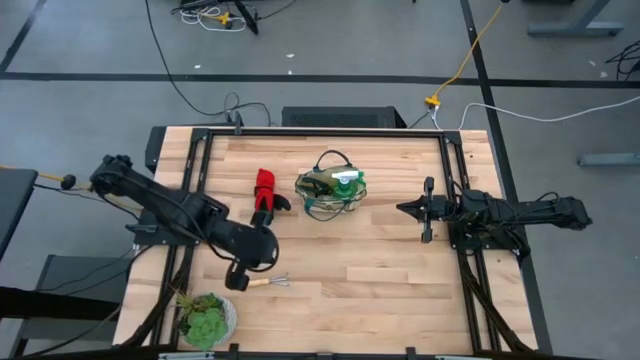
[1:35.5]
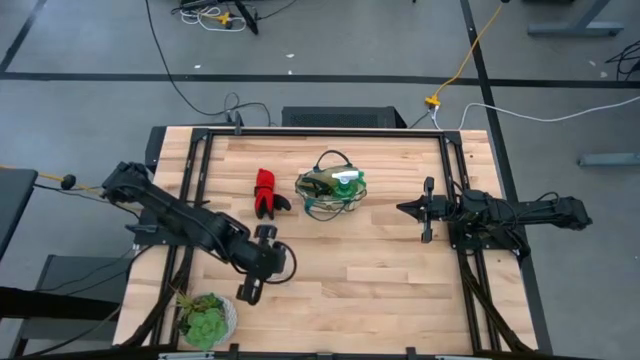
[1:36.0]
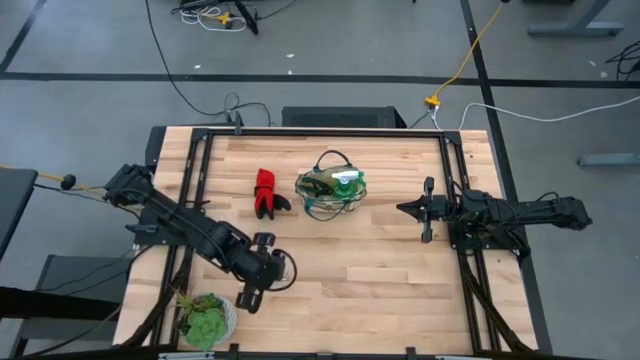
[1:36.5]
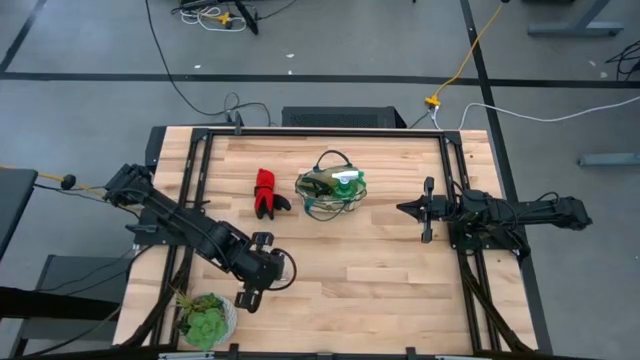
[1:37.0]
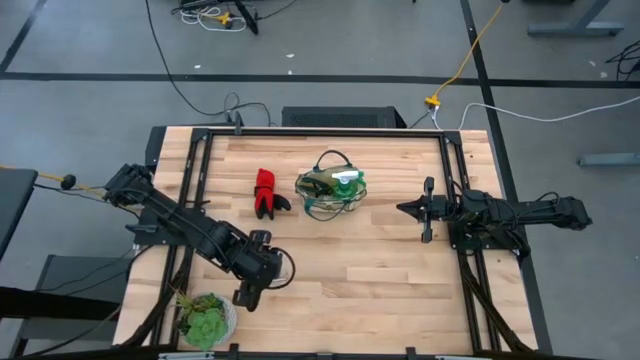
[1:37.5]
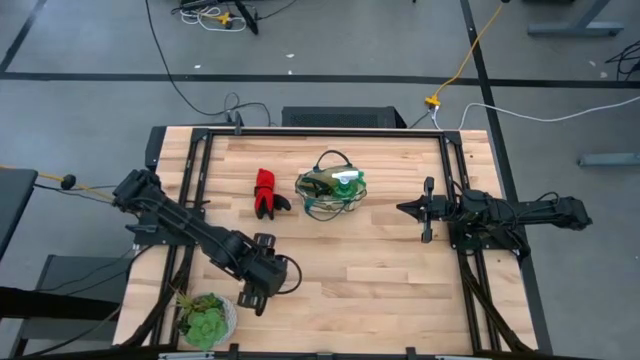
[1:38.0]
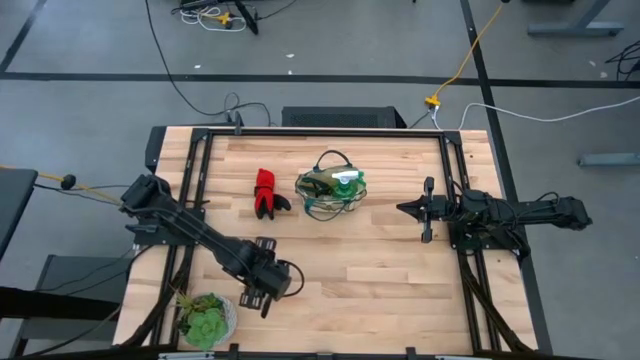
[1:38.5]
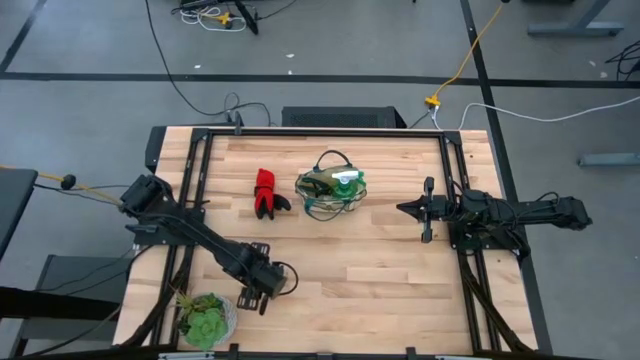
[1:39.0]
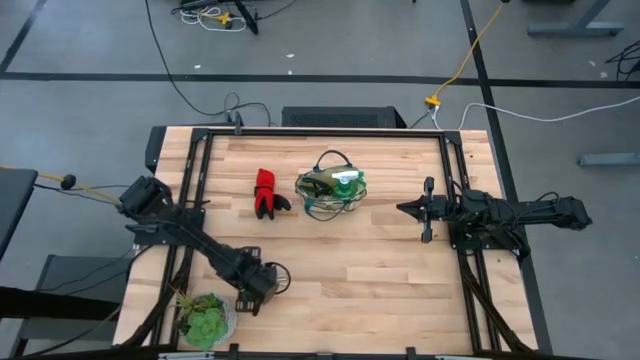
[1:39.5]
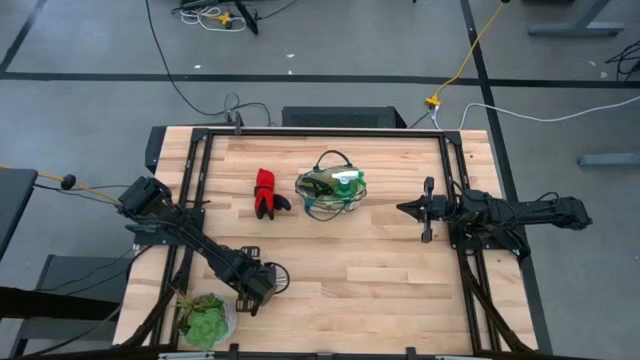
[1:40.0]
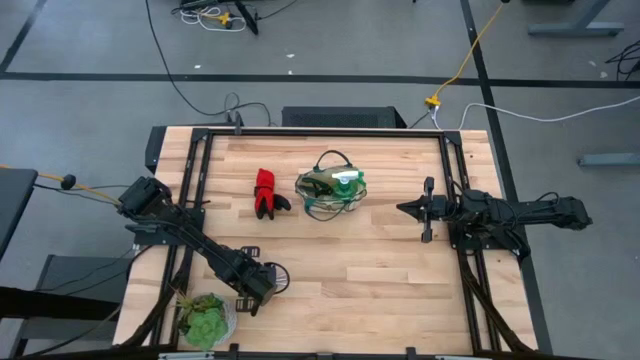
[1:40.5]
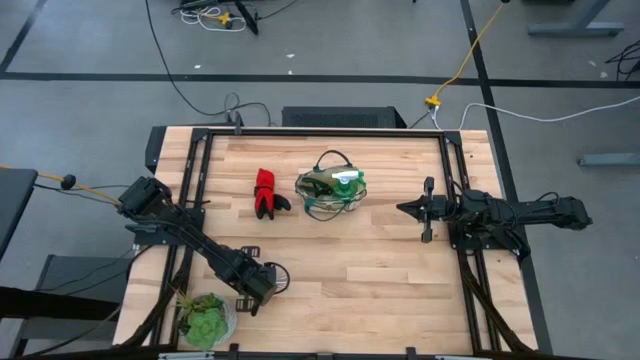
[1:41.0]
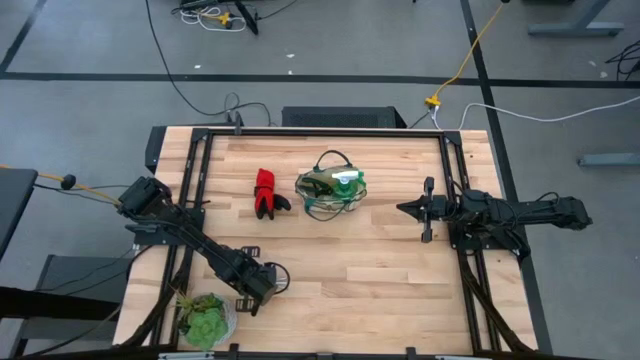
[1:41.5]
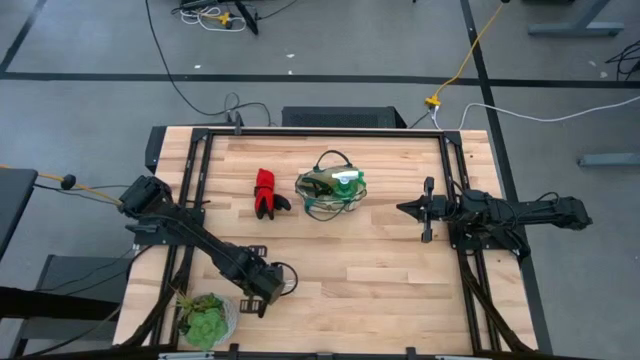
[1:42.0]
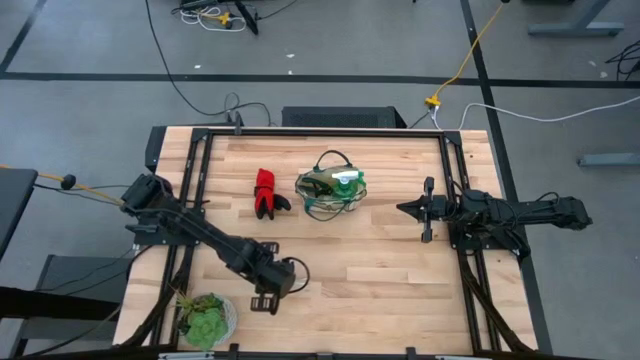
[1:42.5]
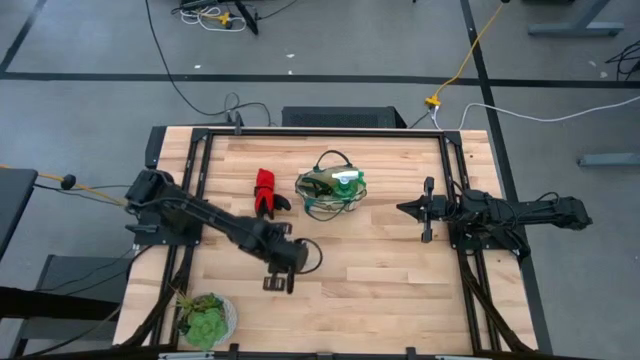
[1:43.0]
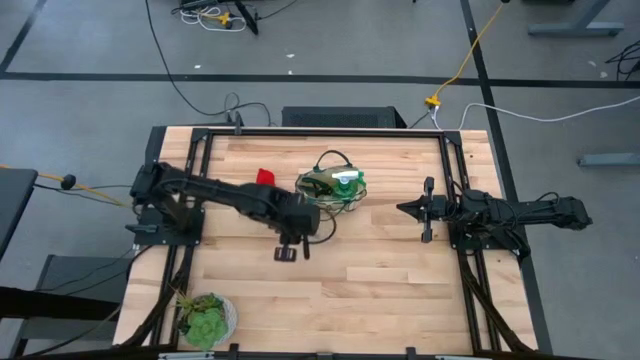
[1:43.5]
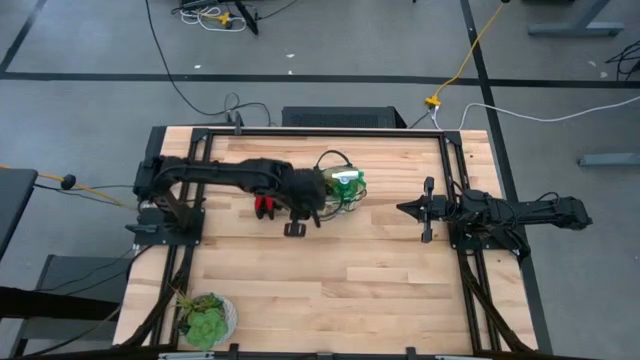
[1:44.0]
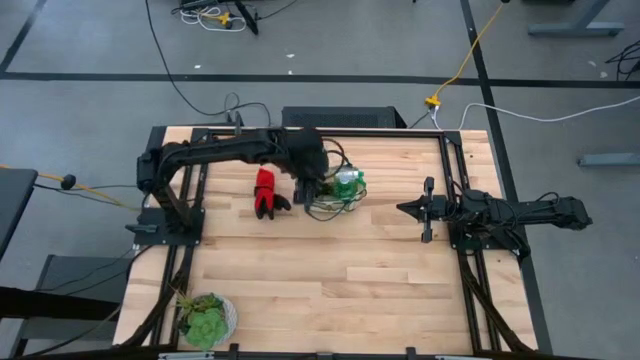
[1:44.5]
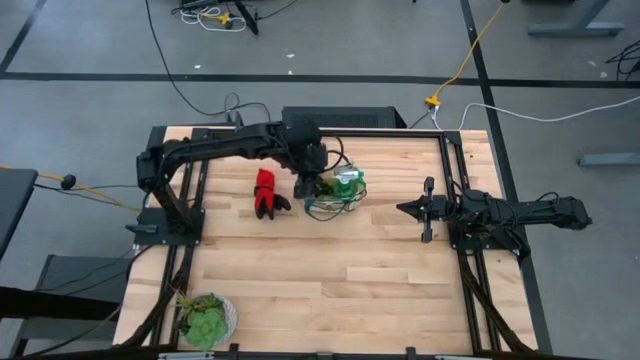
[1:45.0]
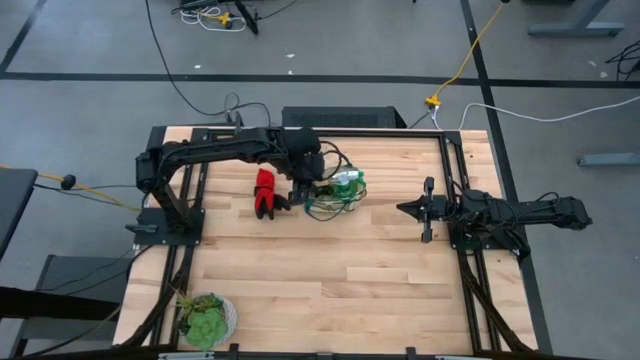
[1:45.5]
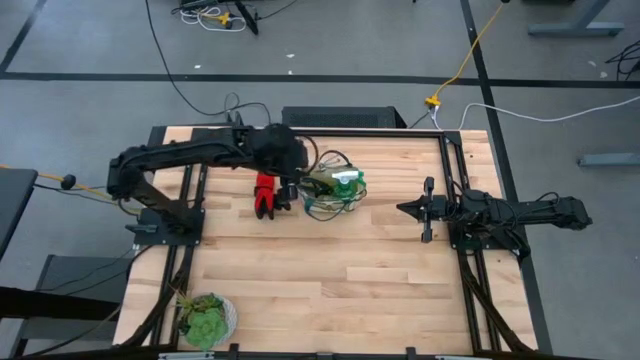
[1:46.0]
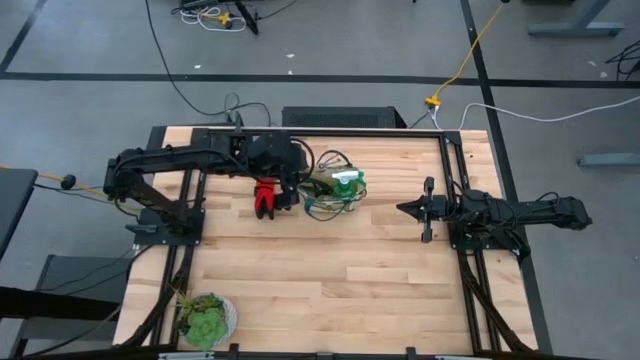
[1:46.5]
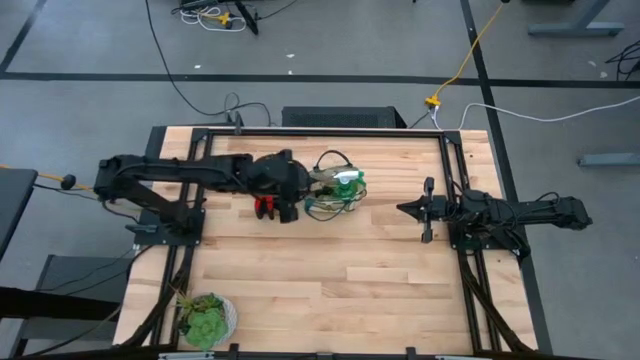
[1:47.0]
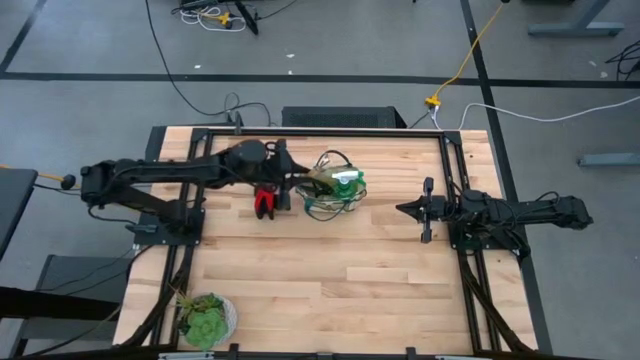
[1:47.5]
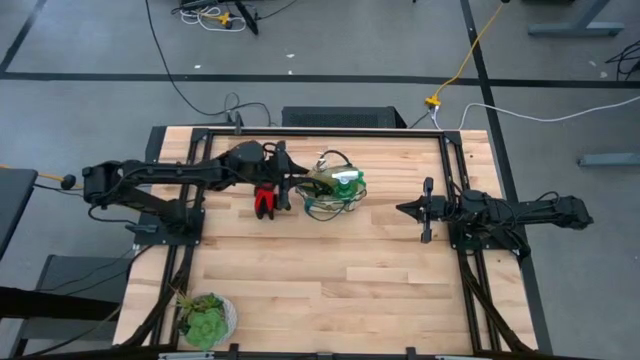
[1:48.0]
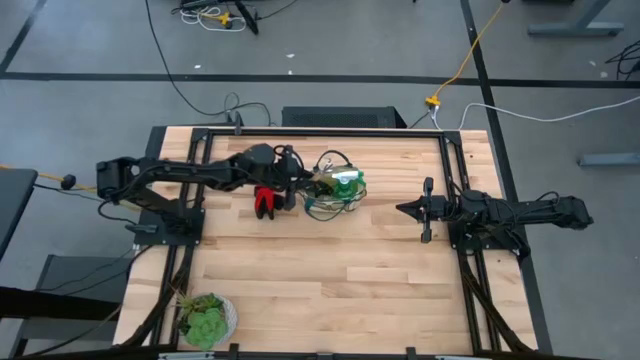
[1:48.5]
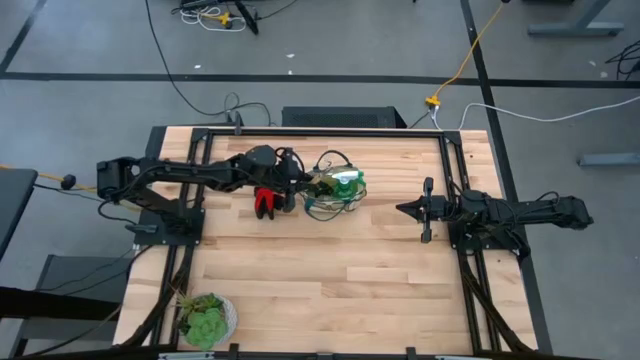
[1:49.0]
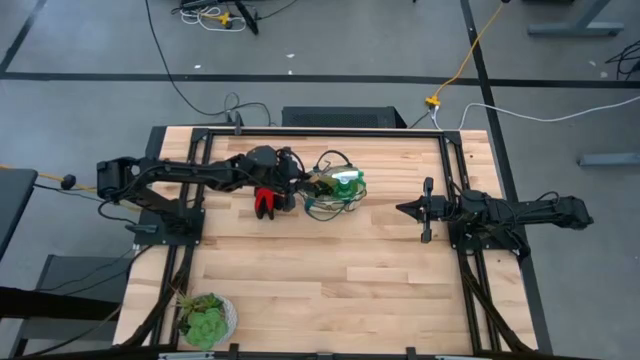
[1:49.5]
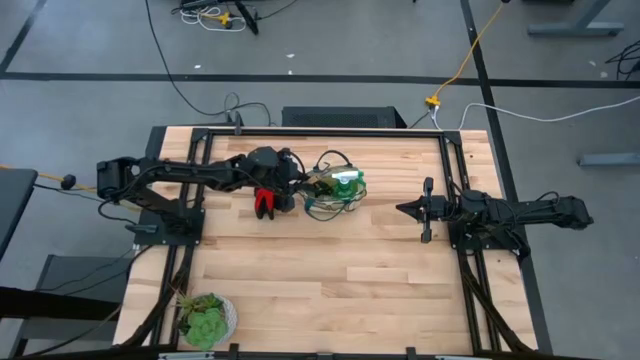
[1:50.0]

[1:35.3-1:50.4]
Task: Pick & Place Garden tools in Gardening bag
Put the brown hand rake into the gardening bag

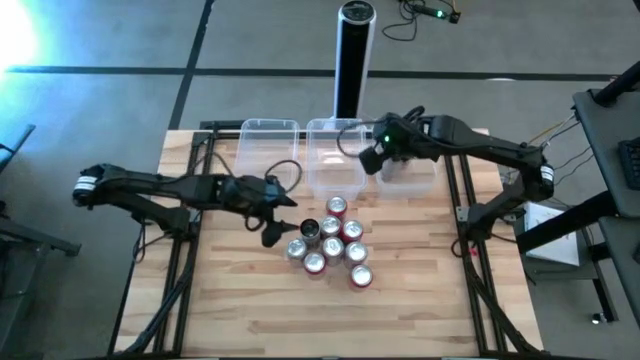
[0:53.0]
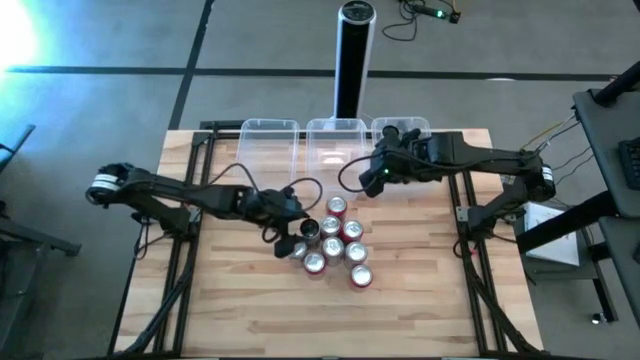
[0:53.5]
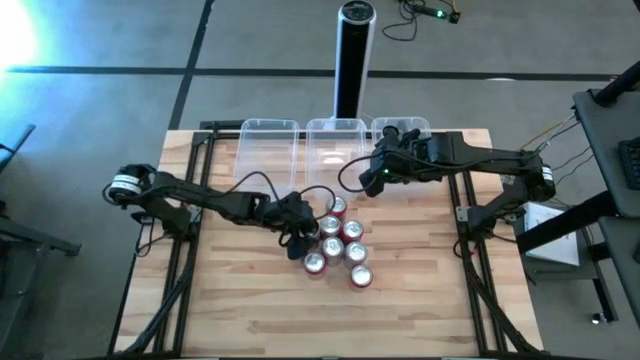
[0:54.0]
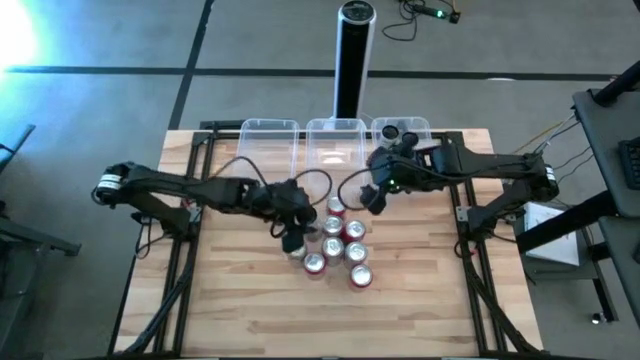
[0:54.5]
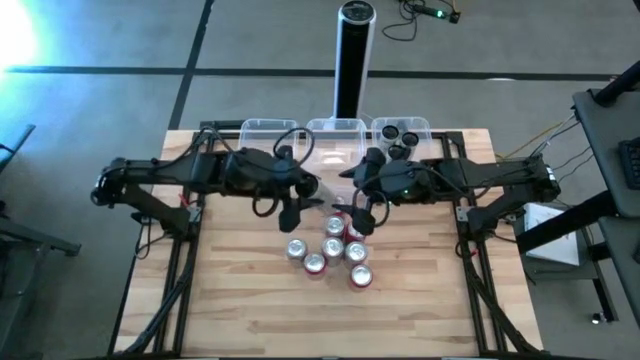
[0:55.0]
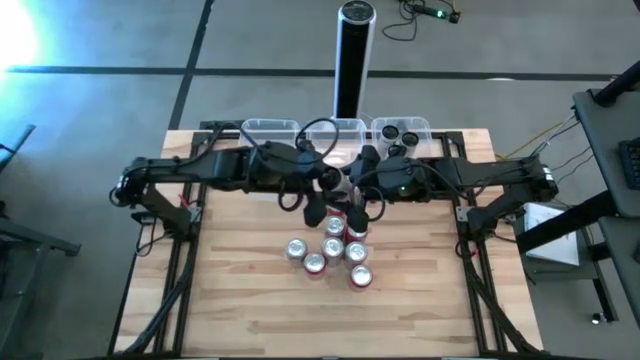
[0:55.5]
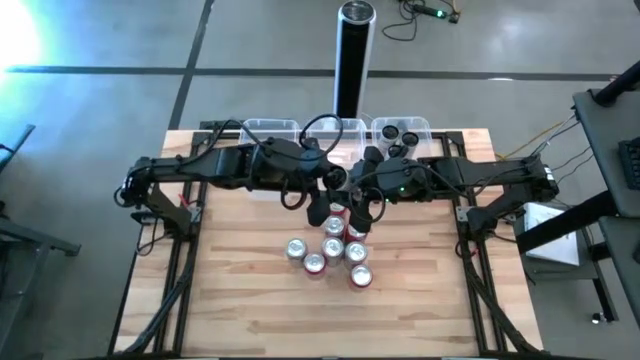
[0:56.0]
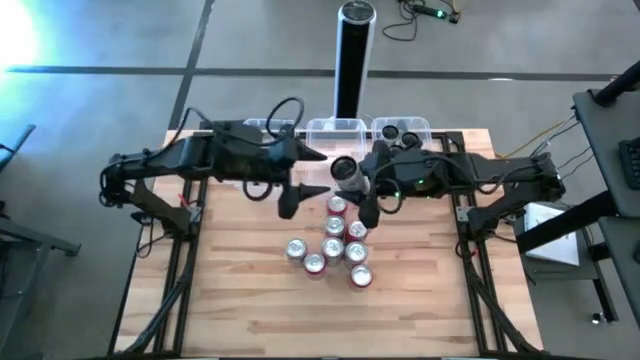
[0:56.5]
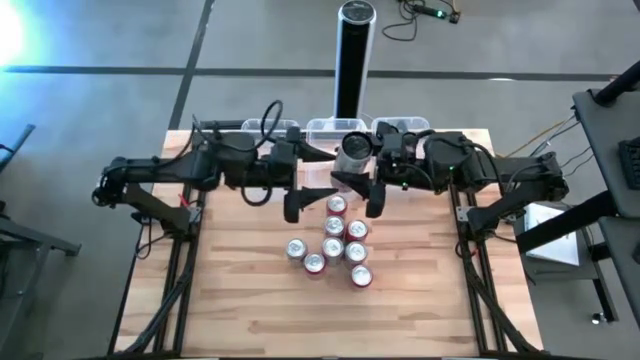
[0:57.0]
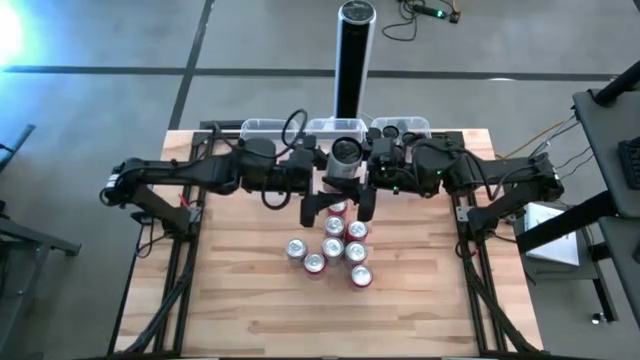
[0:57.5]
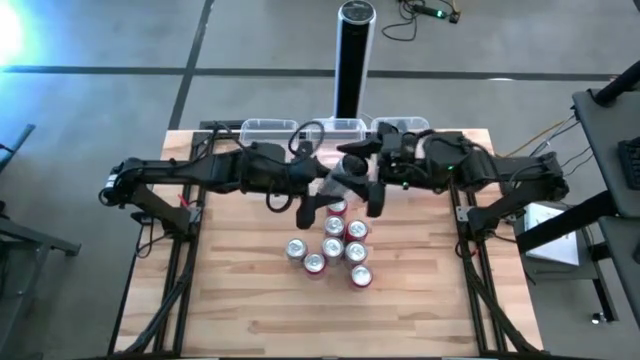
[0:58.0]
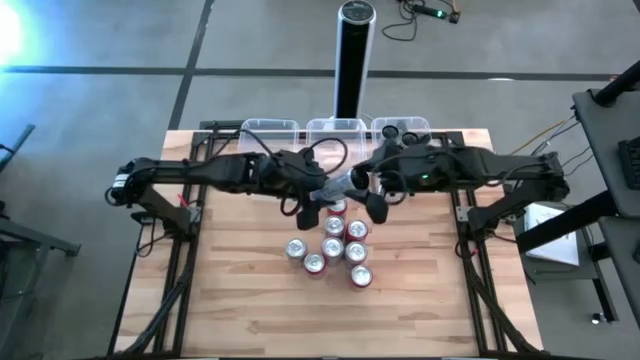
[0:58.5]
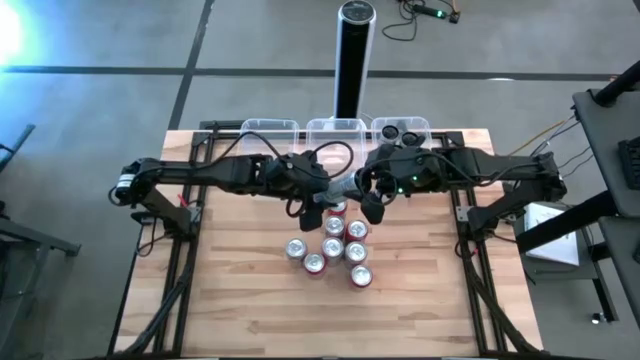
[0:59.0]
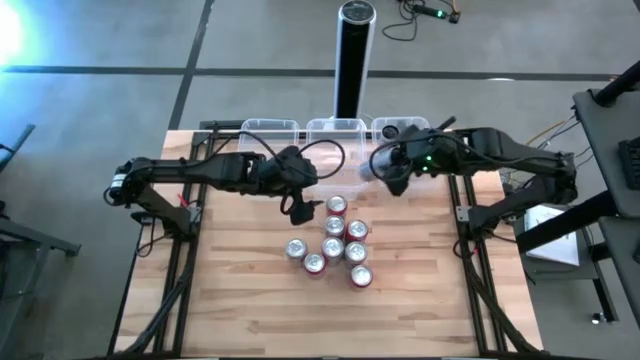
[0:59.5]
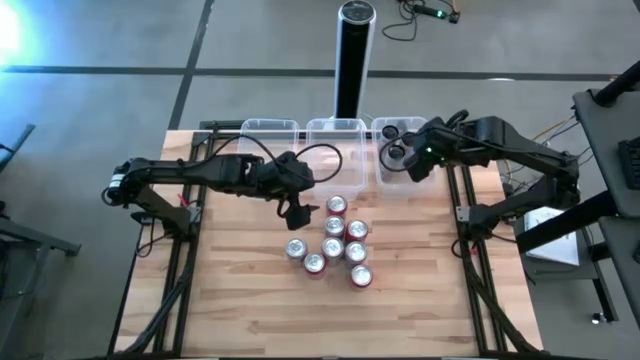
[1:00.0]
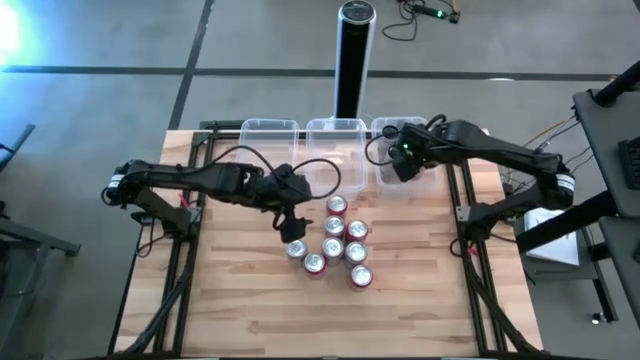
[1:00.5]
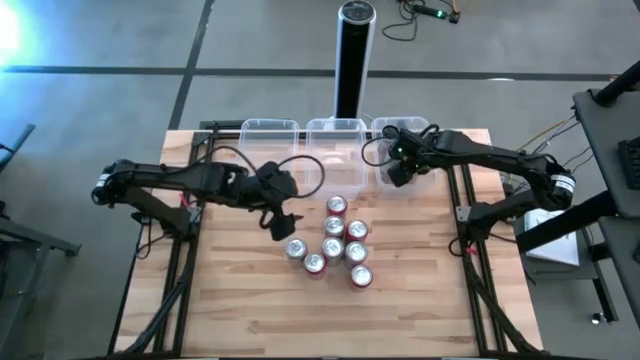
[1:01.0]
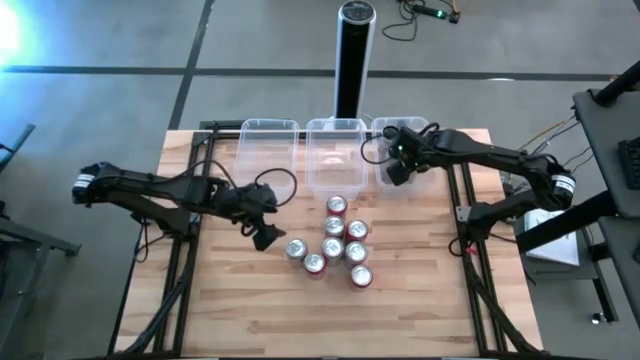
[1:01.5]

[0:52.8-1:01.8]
Task: Sort soda cans
Put the white-pink soda can into the right white bin
